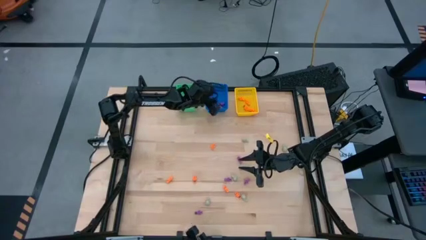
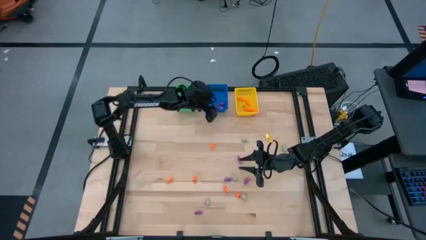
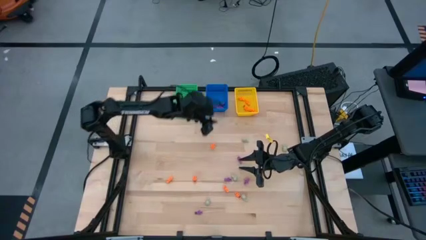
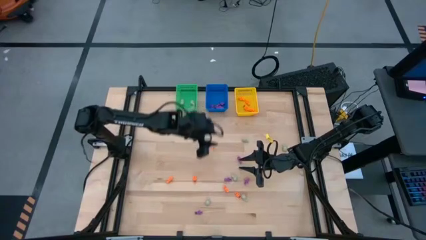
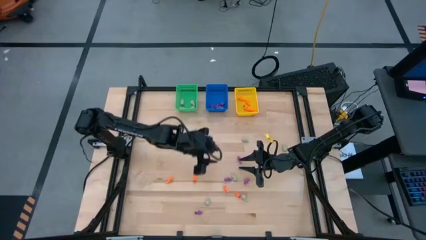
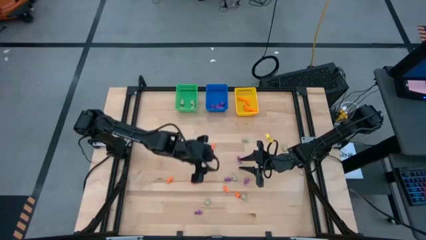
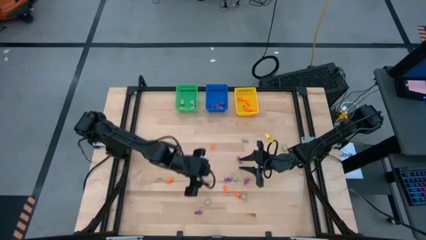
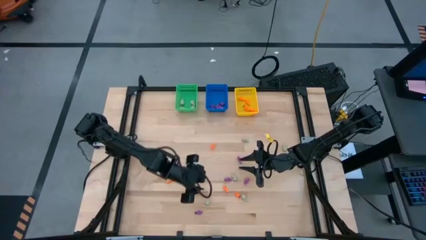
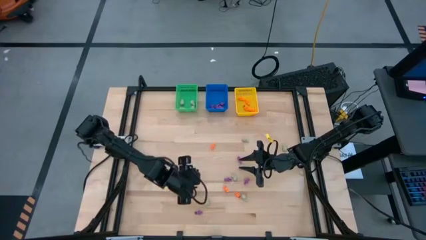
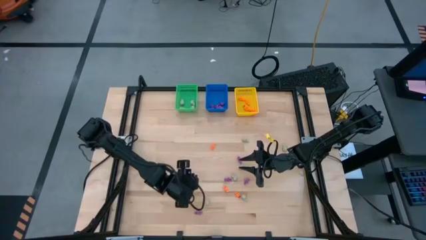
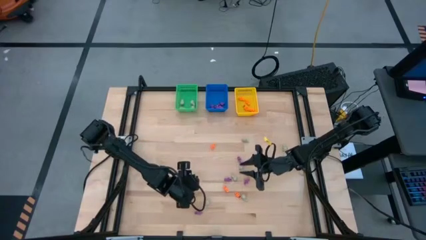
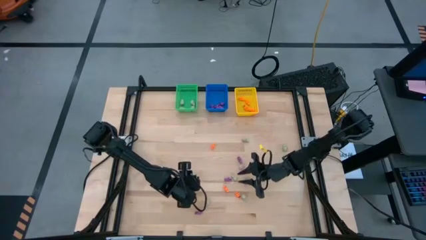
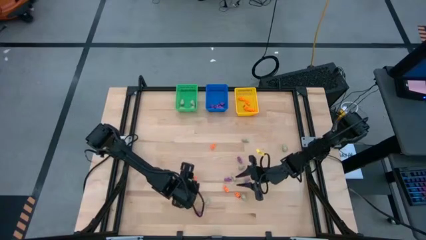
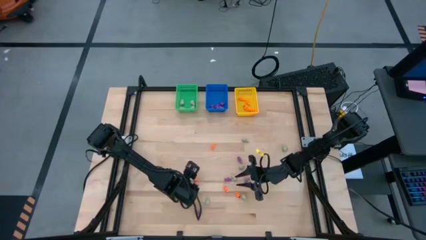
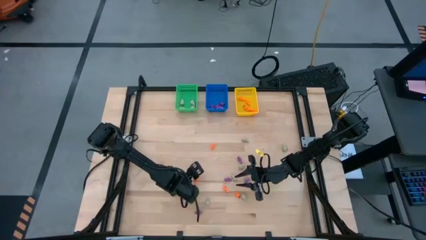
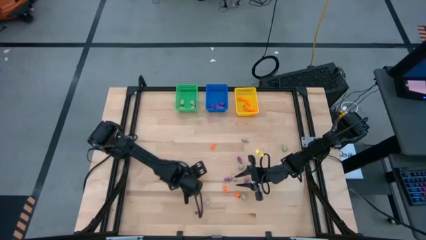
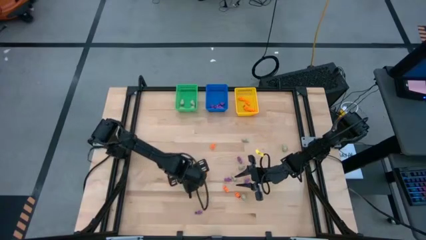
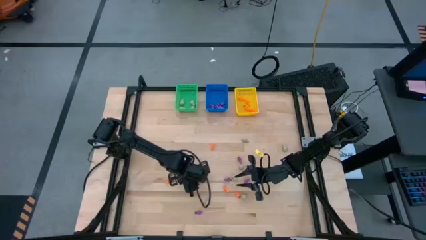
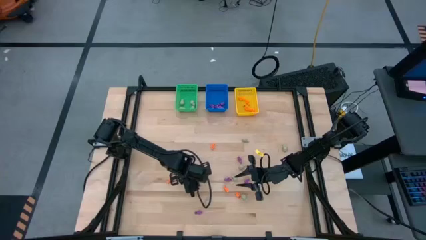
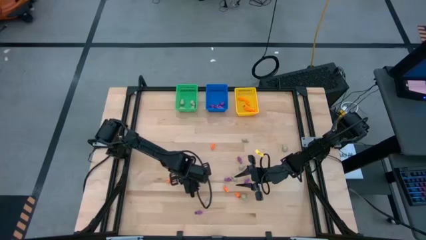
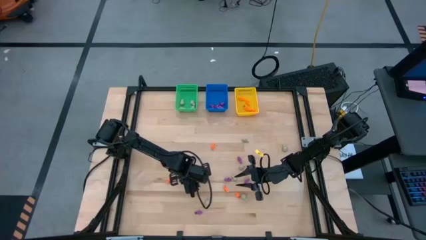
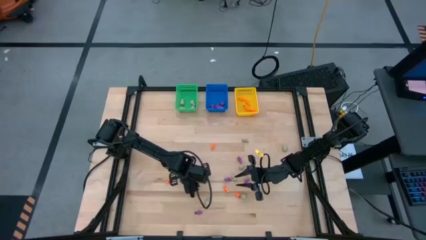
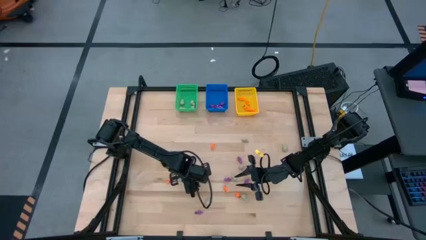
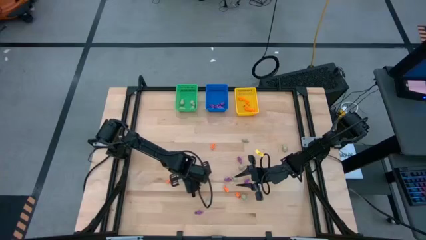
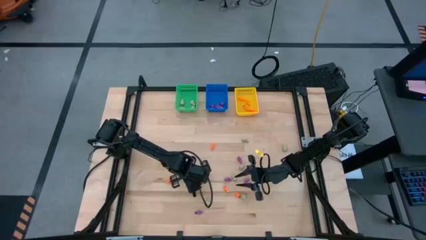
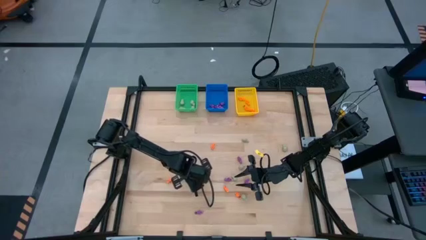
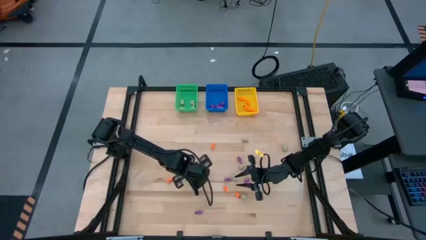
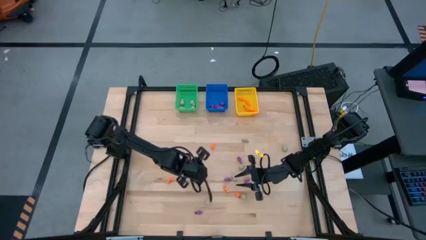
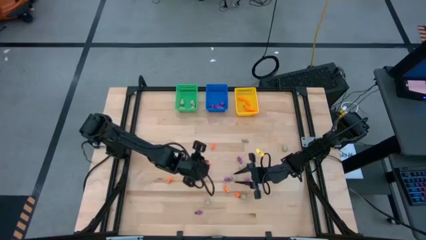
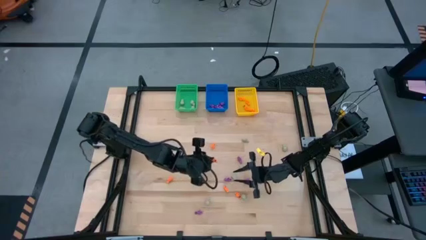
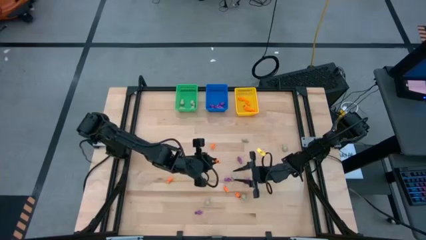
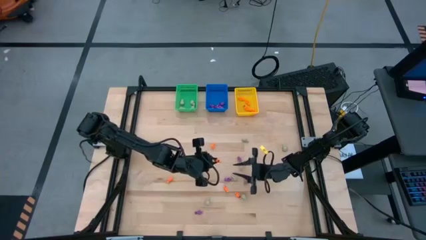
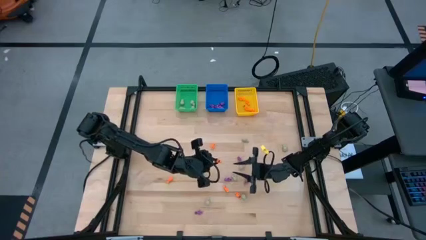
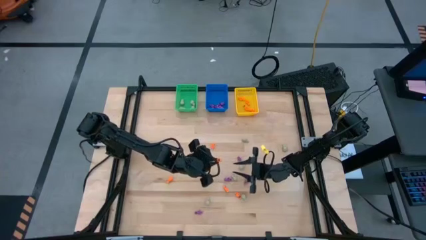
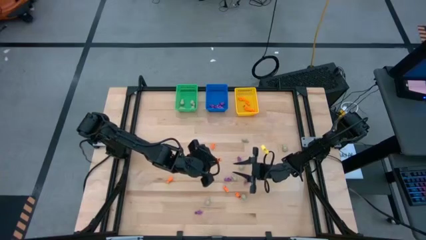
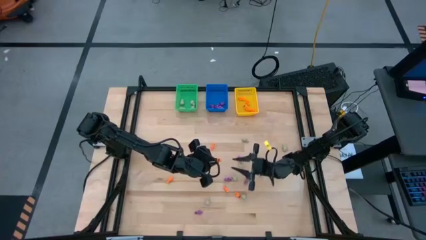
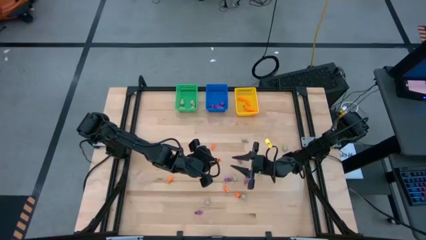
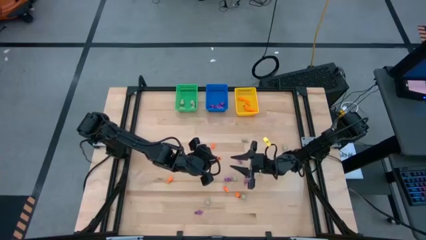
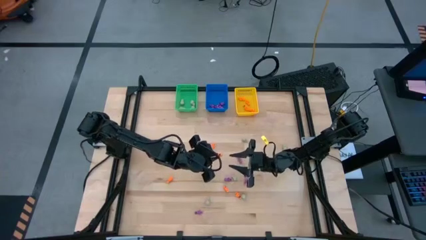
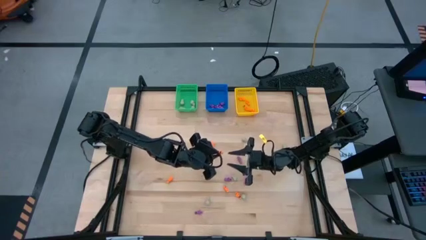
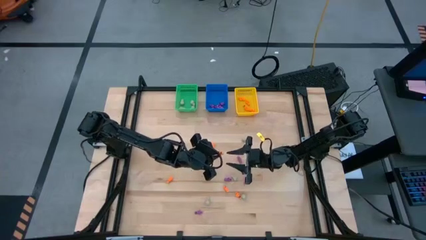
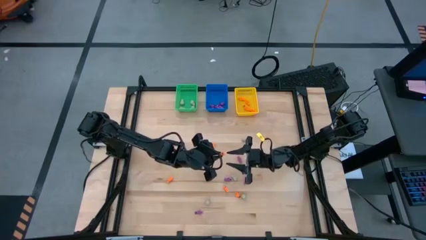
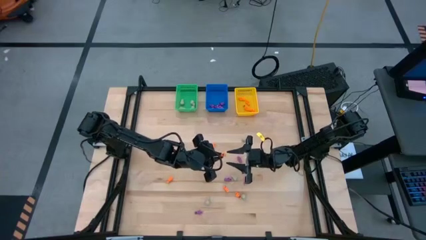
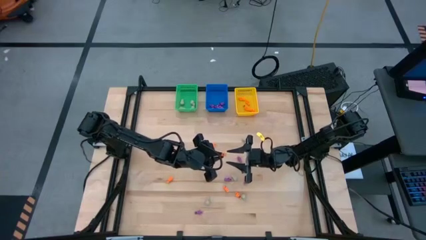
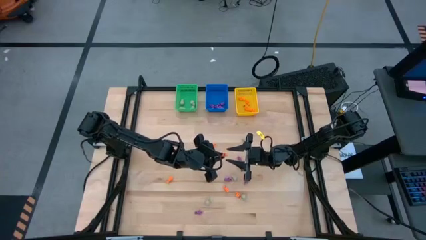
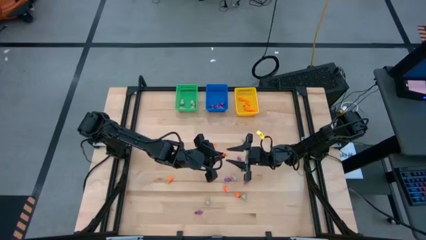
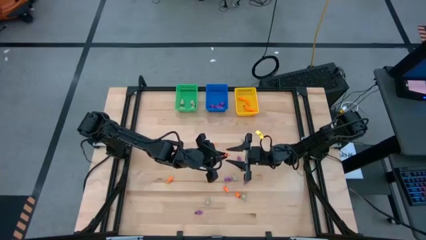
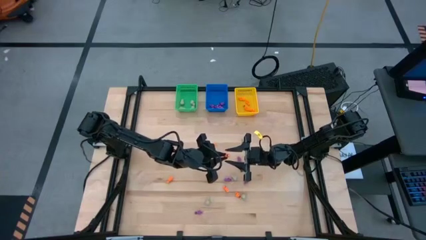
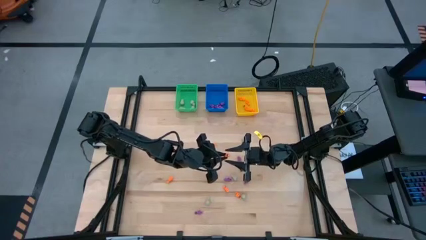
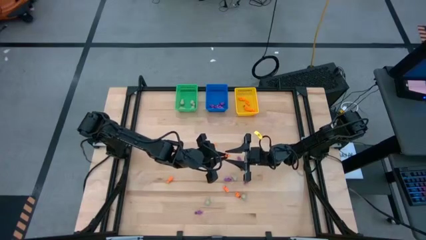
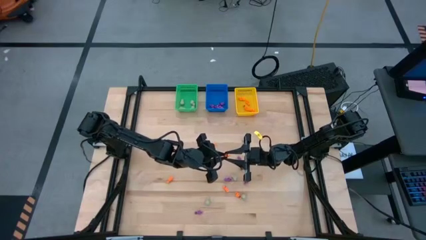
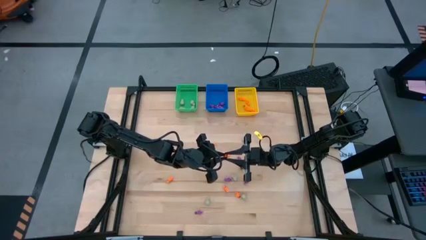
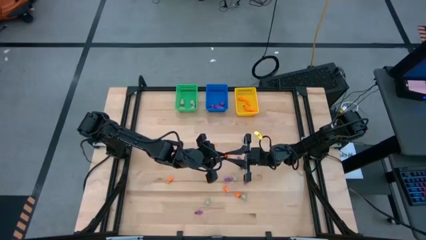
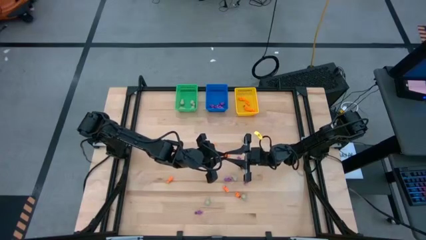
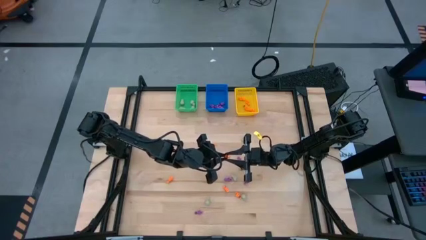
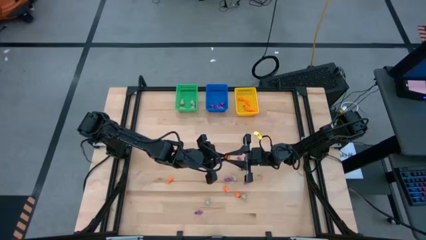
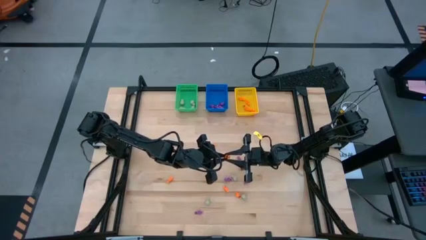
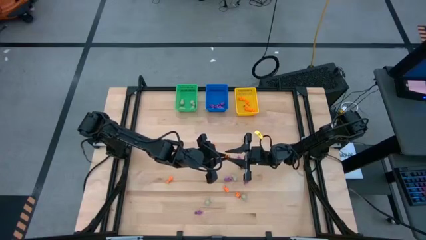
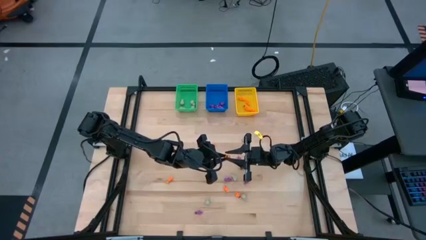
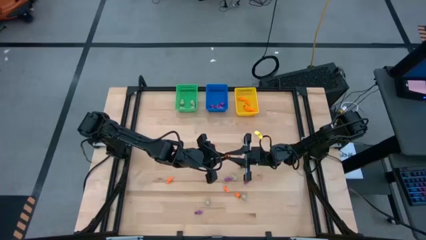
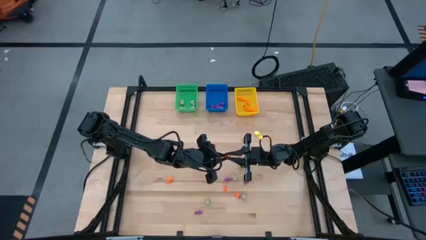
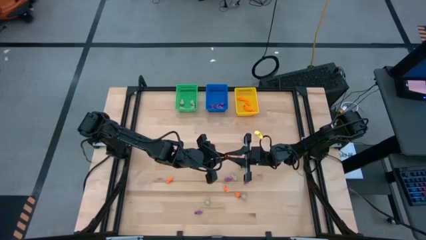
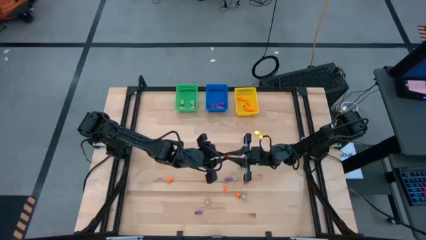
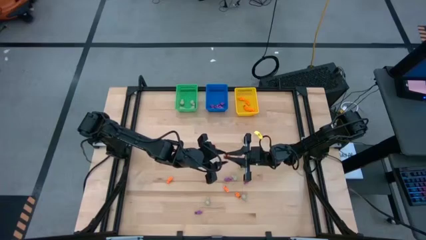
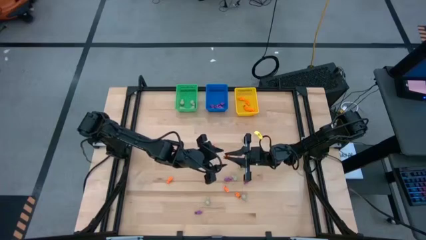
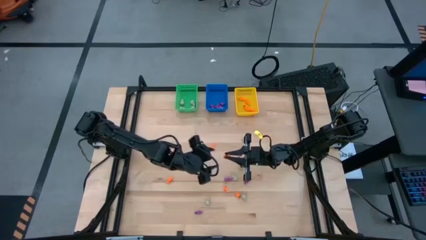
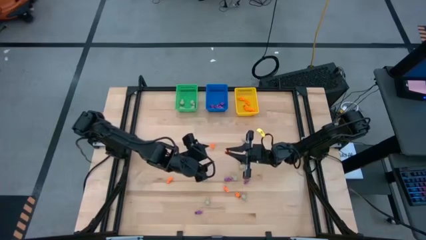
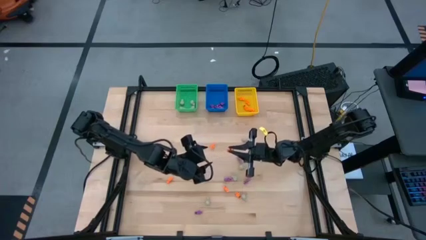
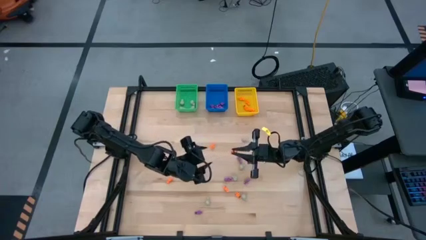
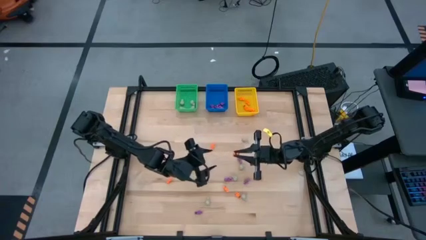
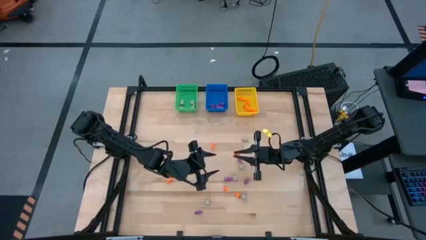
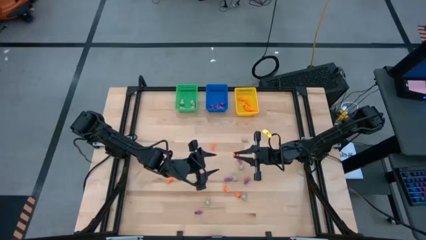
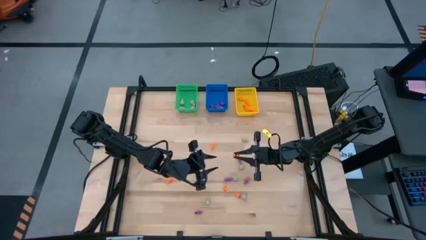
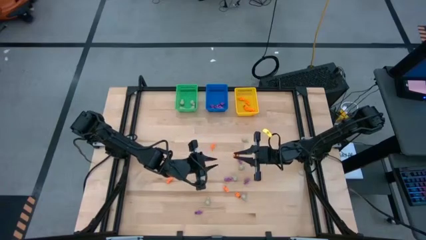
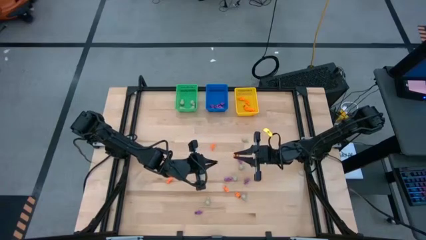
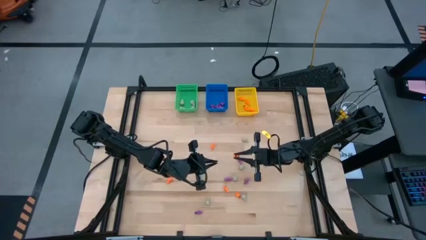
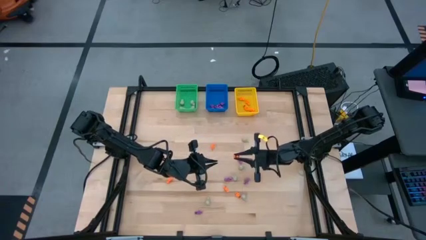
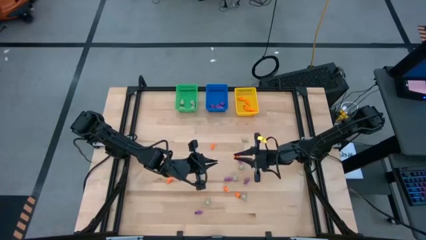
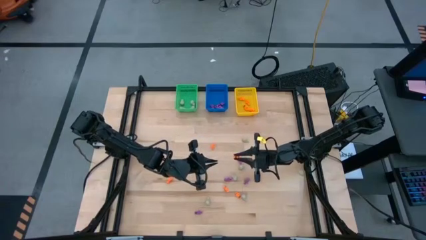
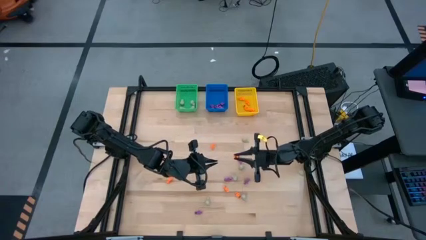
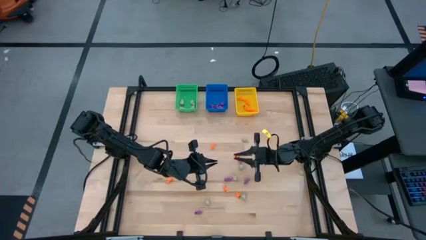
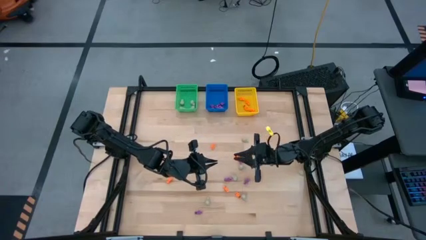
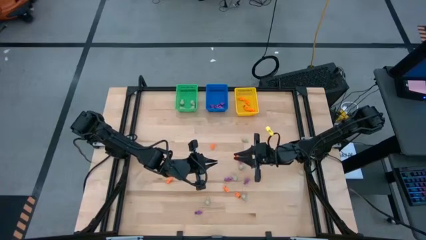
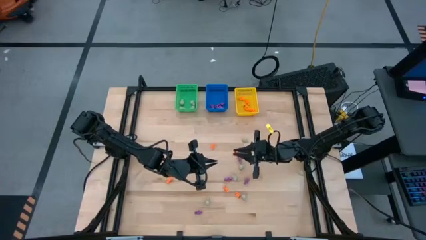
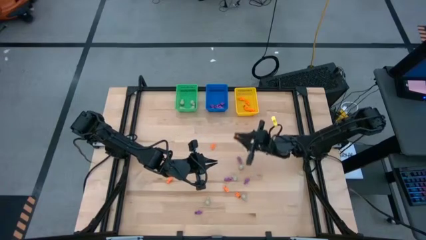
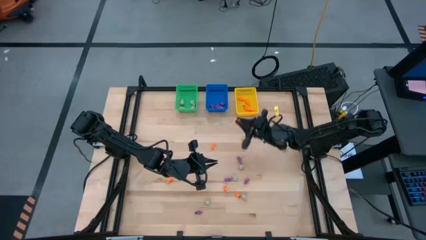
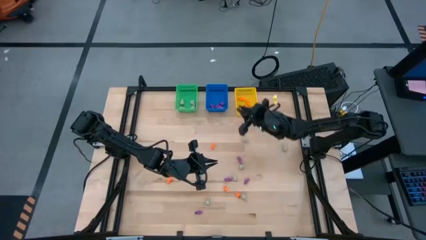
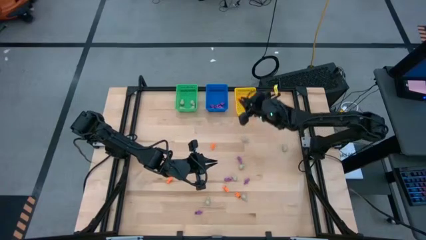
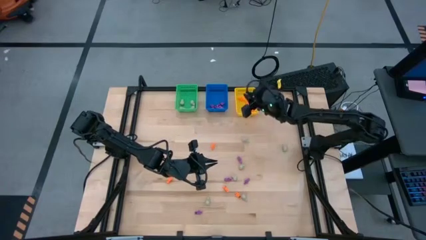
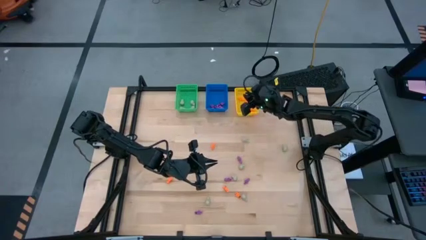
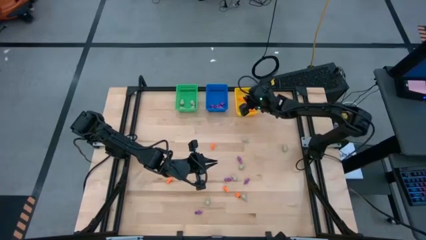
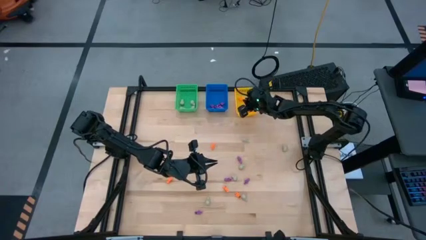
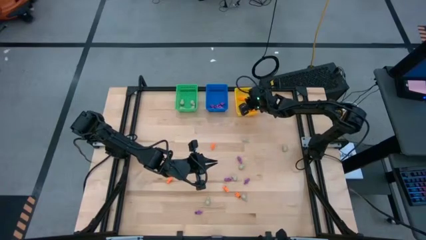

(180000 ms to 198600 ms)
Task: Sort Halloween decoration
Put the orange skeleton toy into the yellow bin
